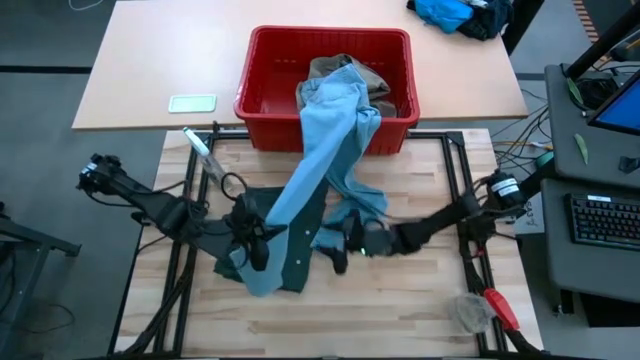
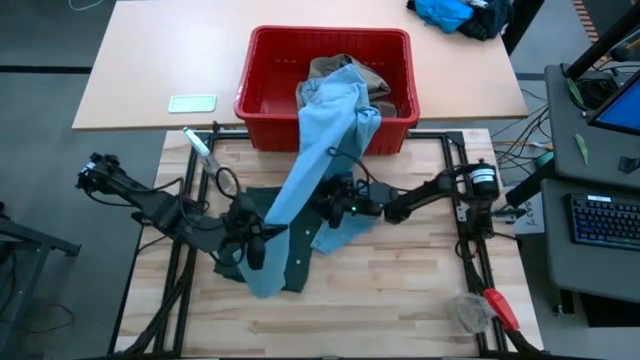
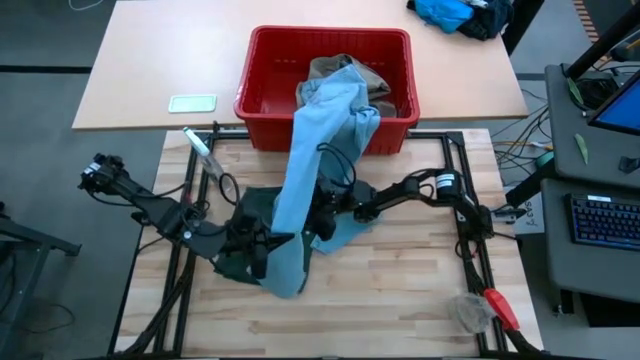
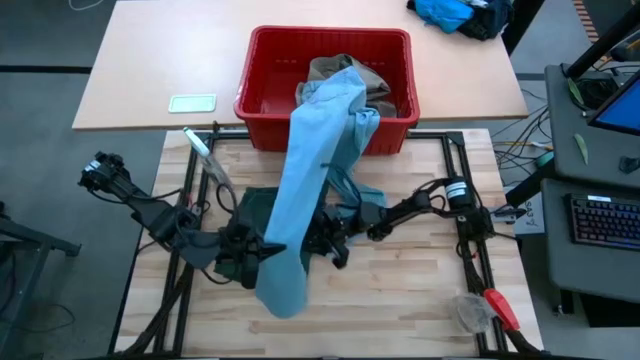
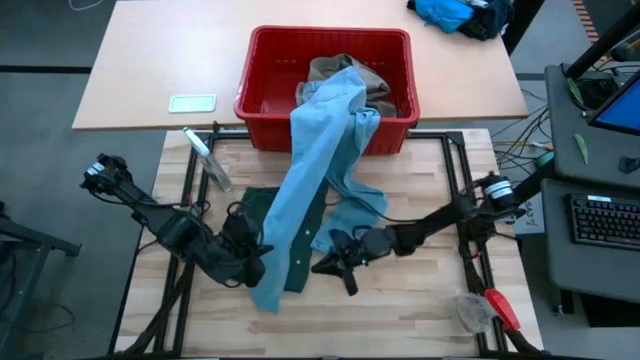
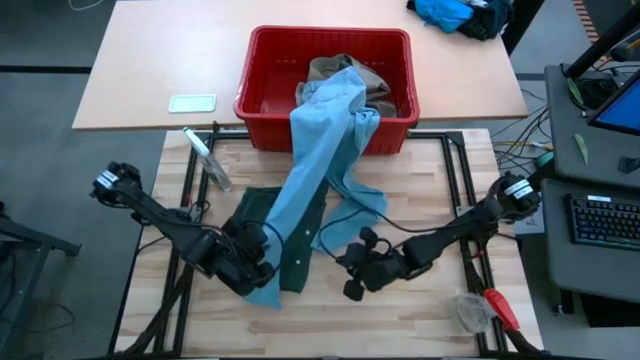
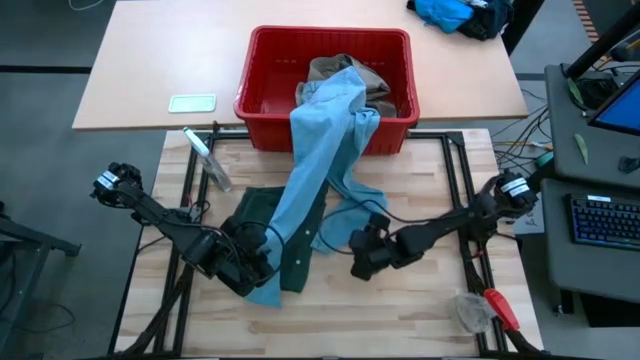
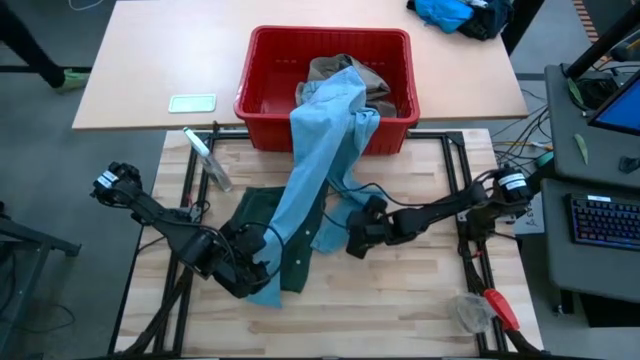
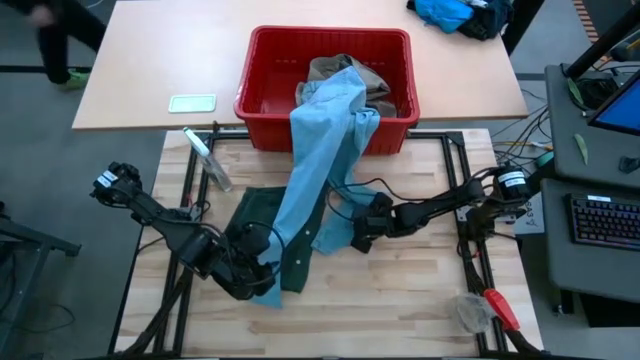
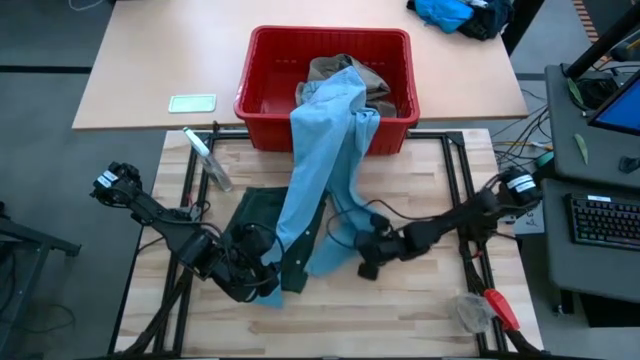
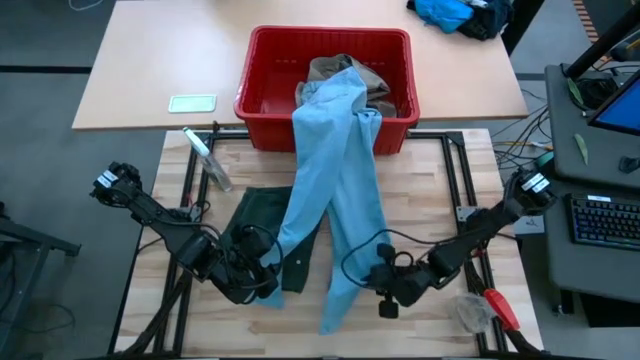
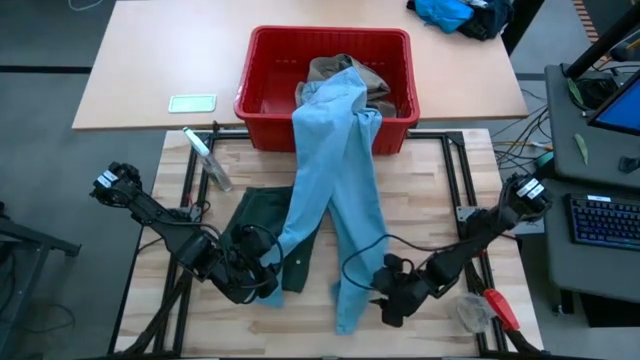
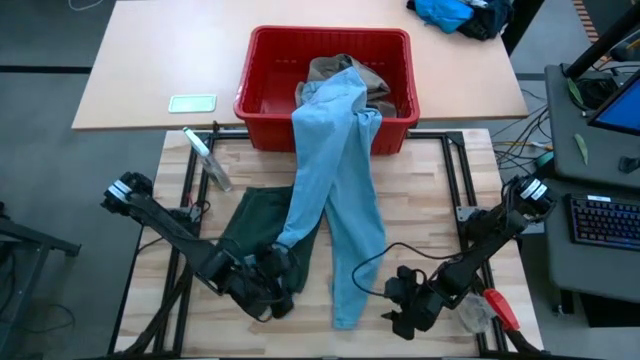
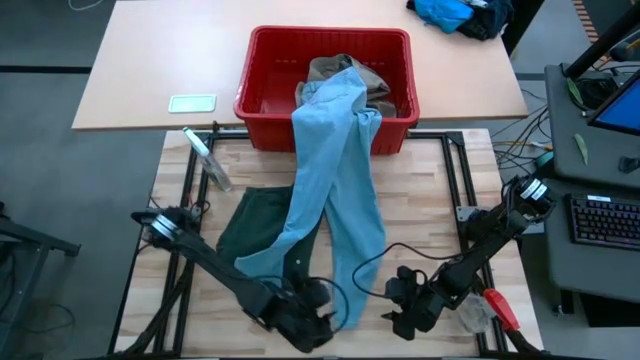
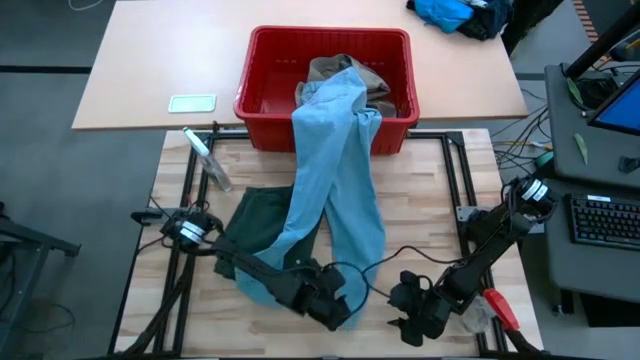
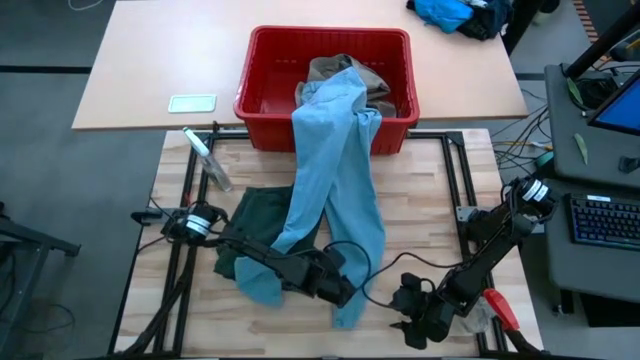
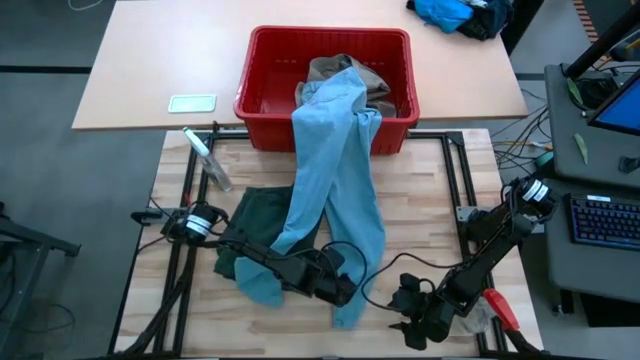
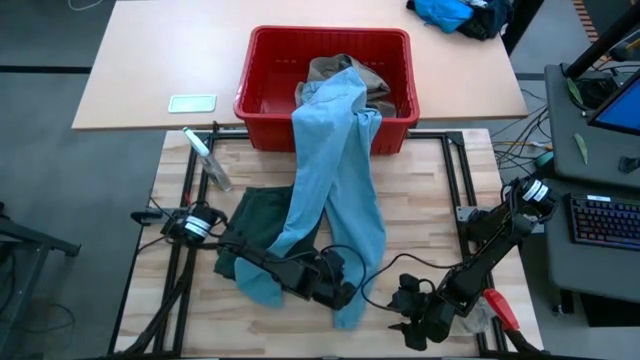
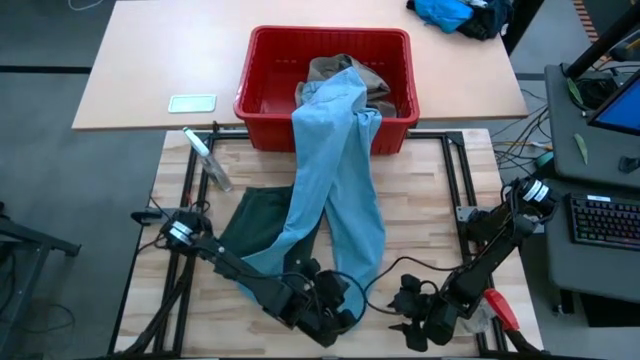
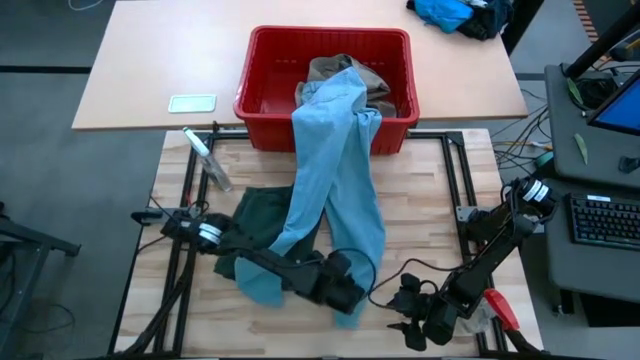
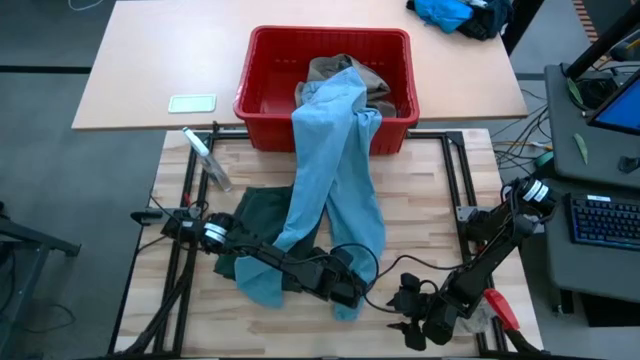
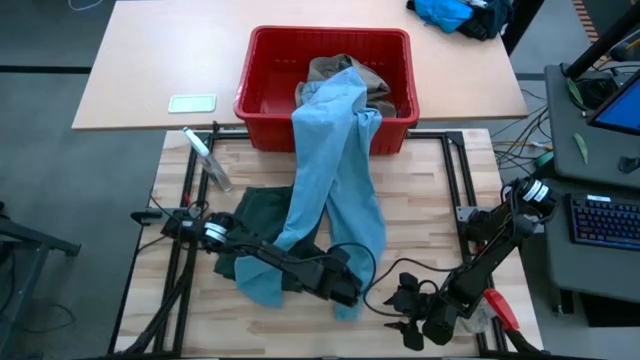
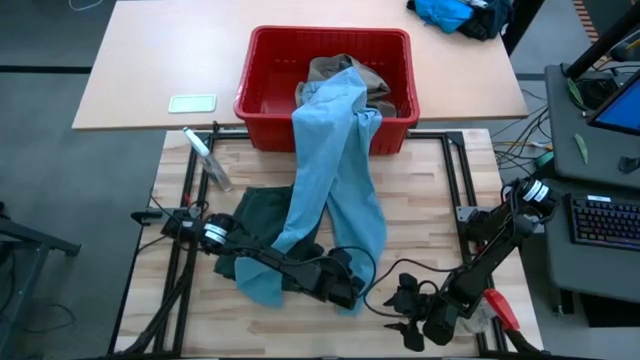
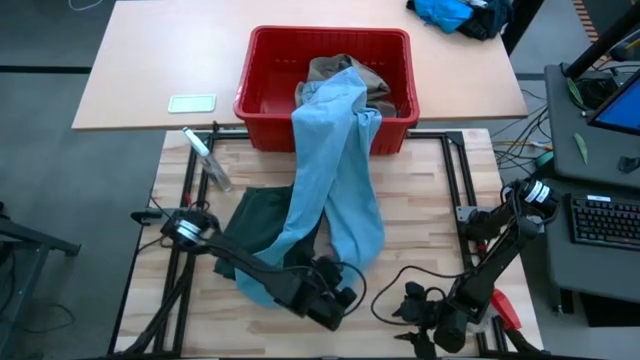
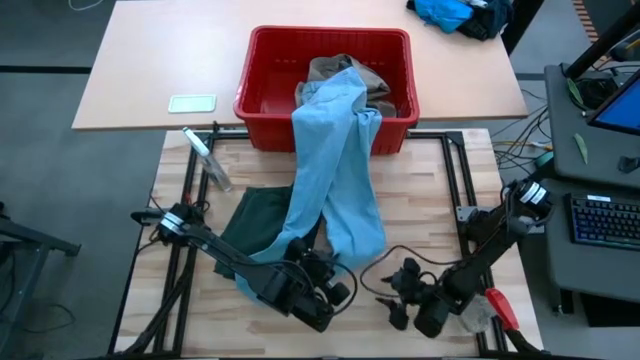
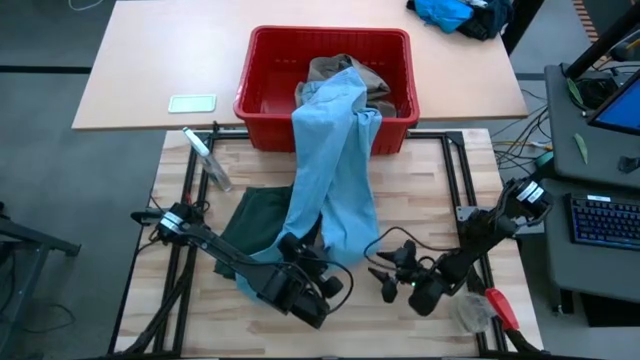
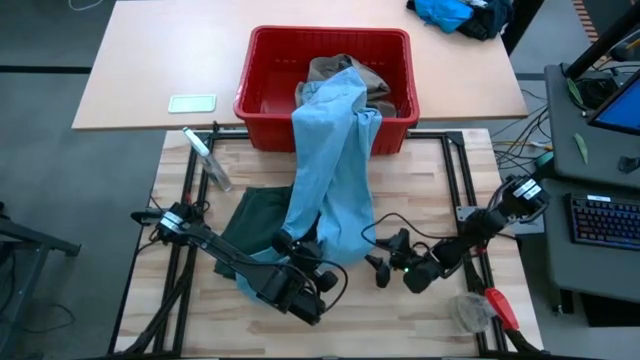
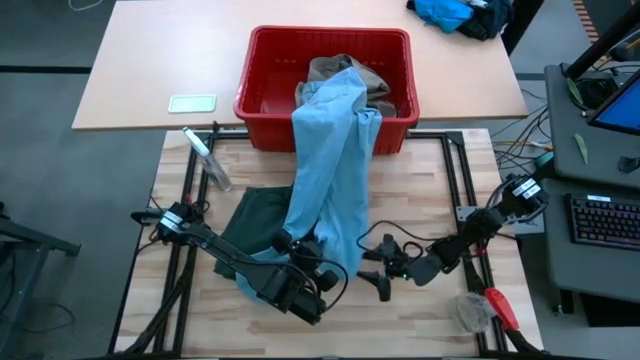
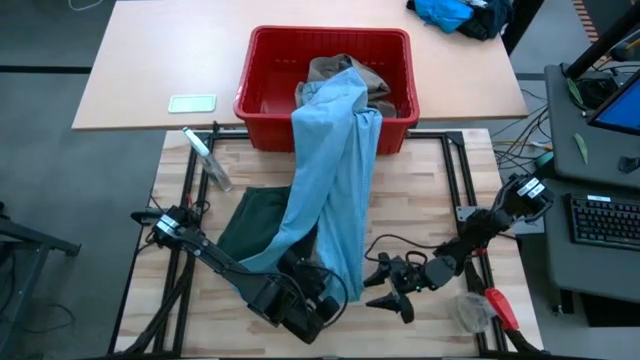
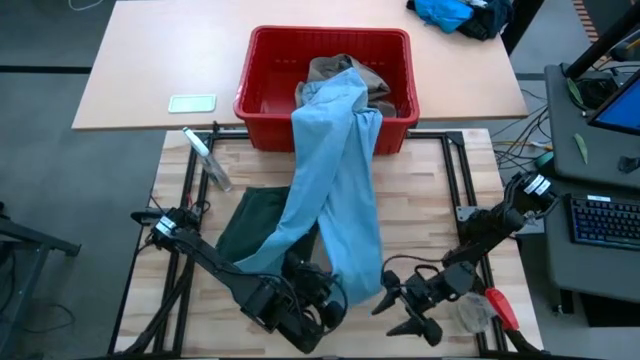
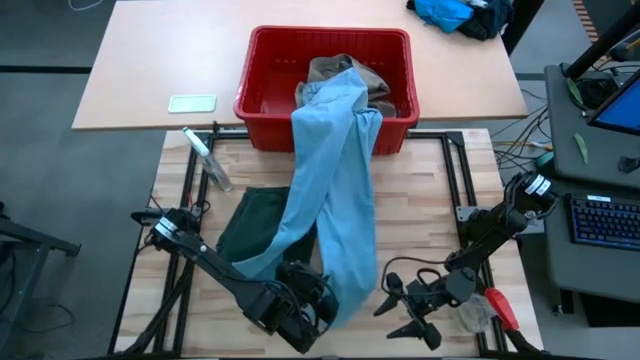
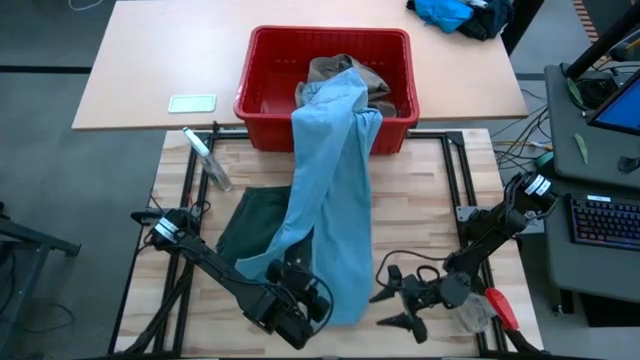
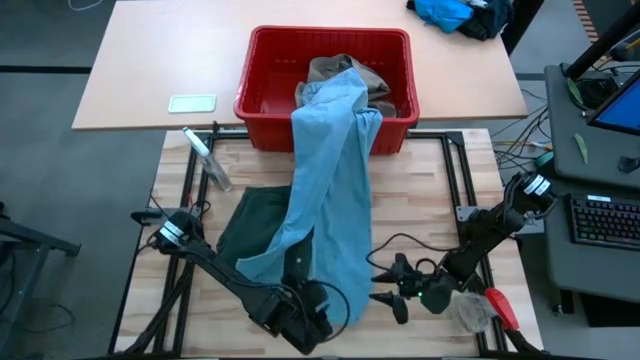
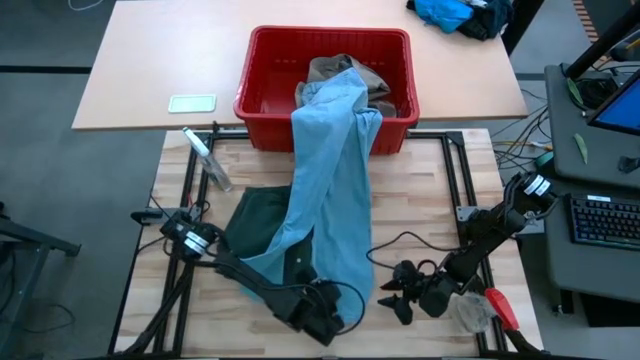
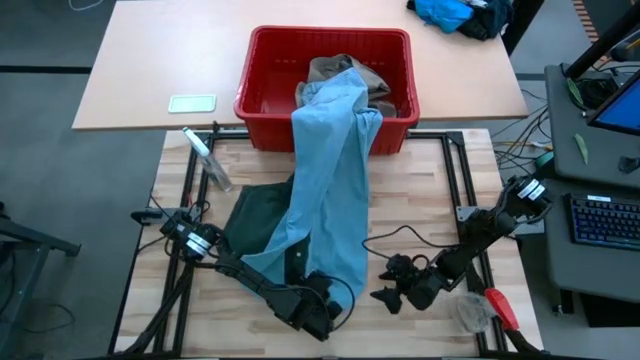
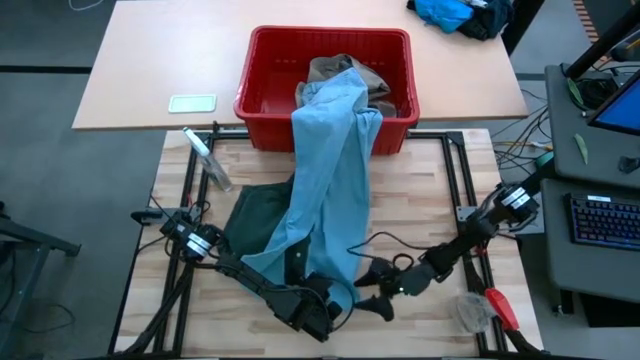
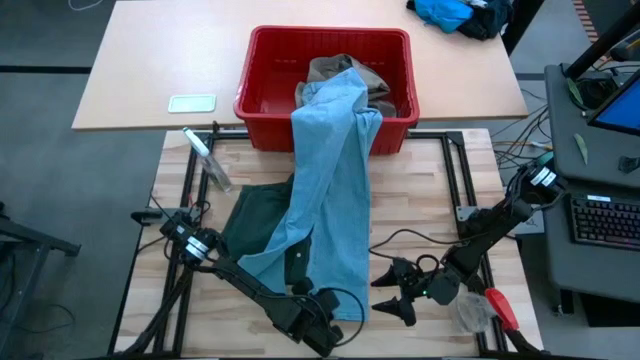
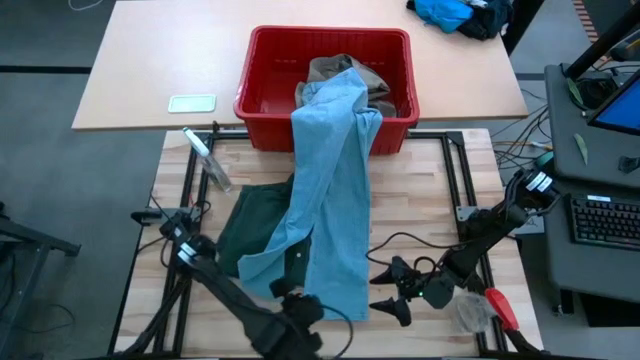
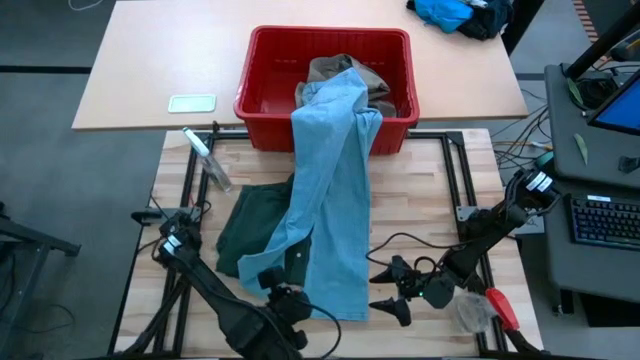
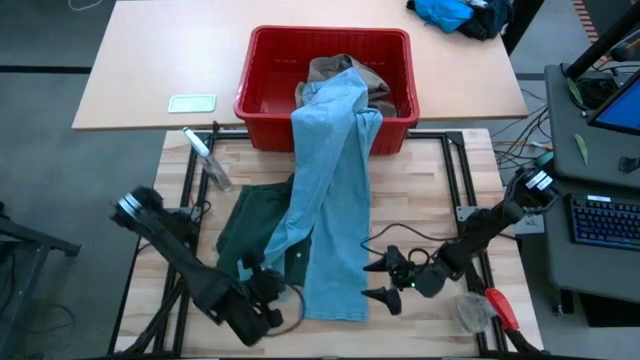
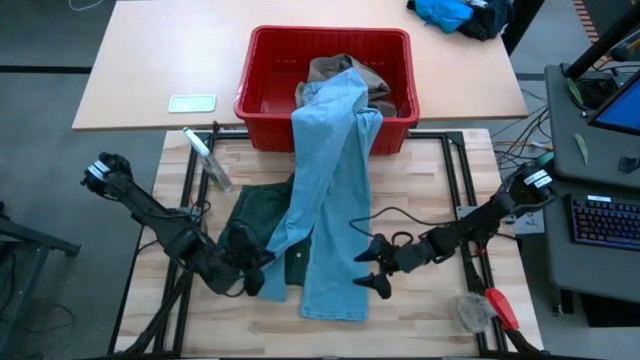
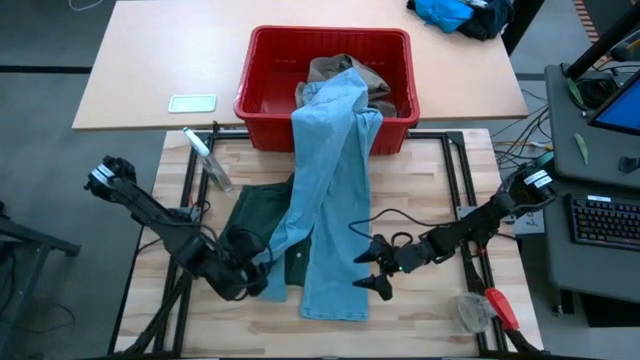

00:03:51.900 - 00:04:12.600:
Task: Fold Laundry from Bin
Fold the blue jeans
